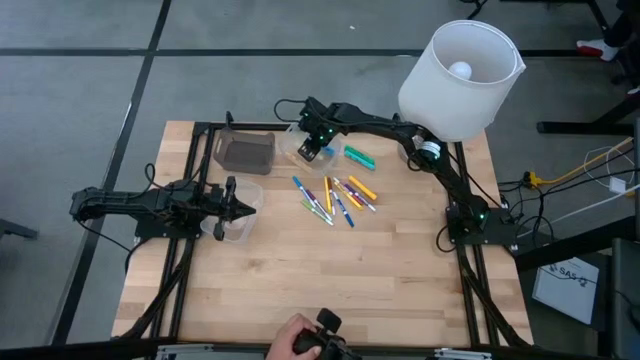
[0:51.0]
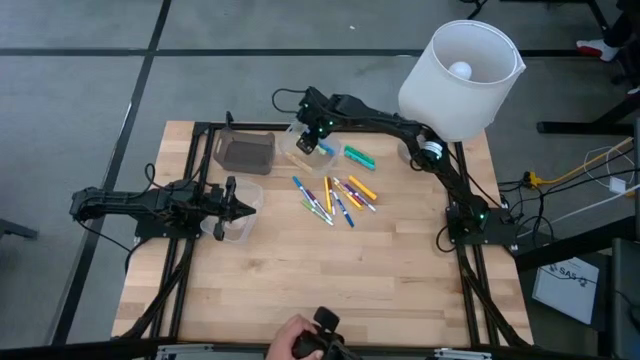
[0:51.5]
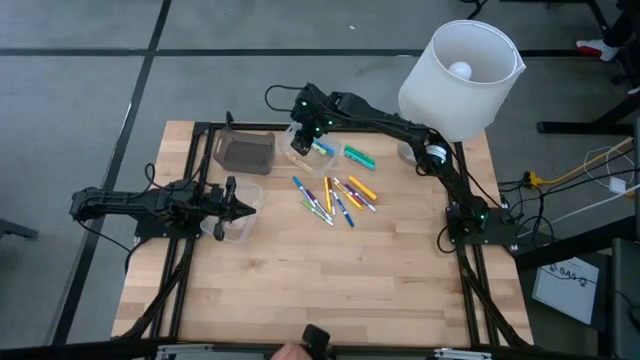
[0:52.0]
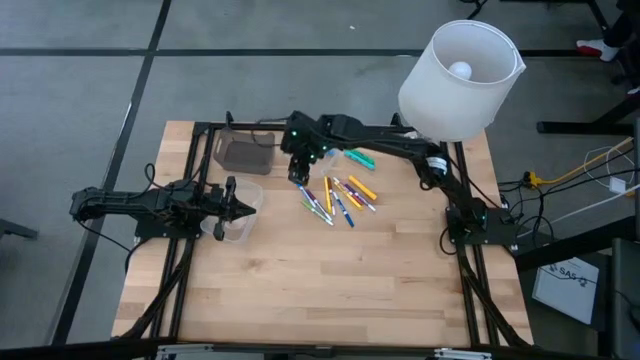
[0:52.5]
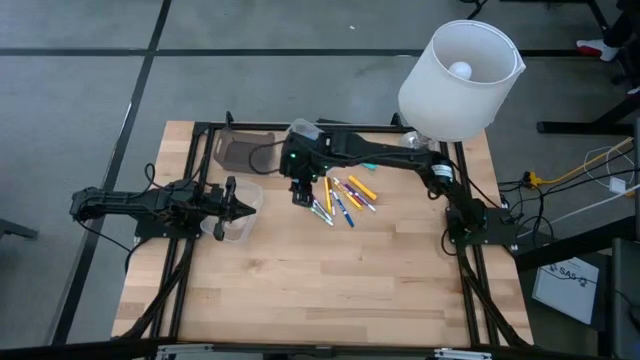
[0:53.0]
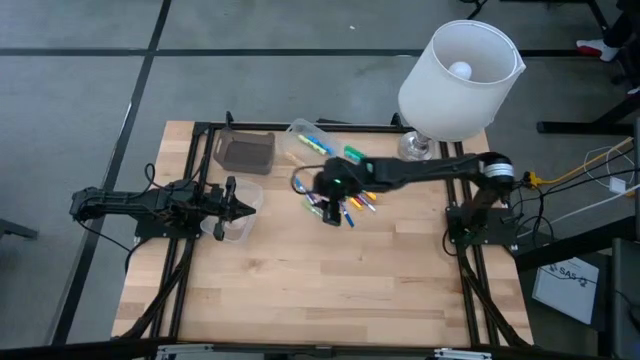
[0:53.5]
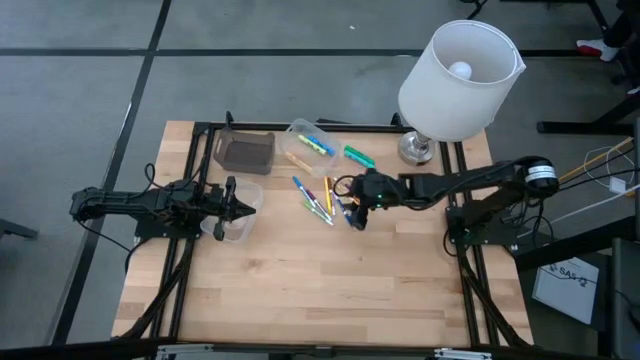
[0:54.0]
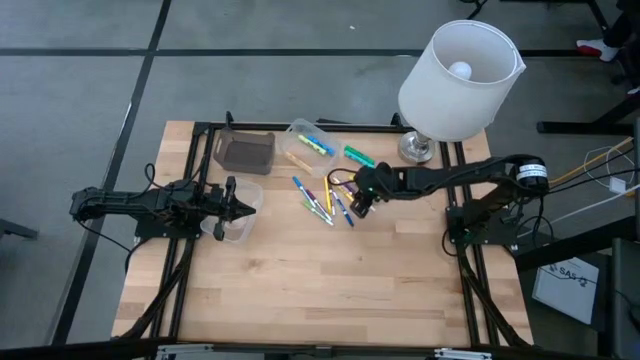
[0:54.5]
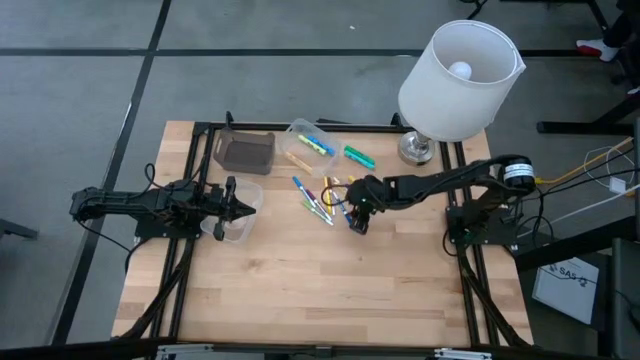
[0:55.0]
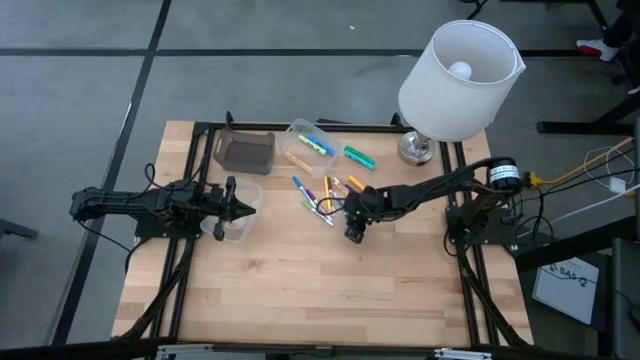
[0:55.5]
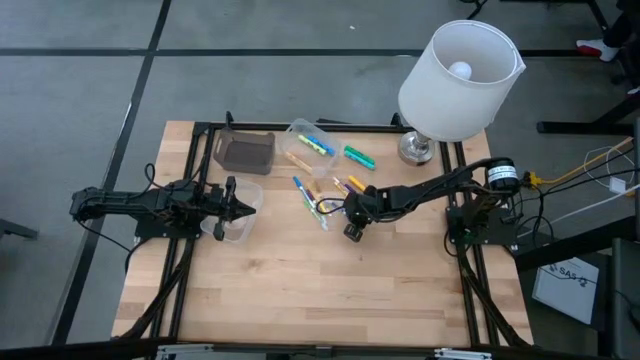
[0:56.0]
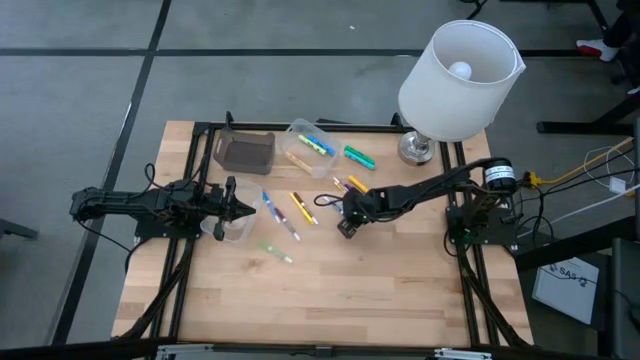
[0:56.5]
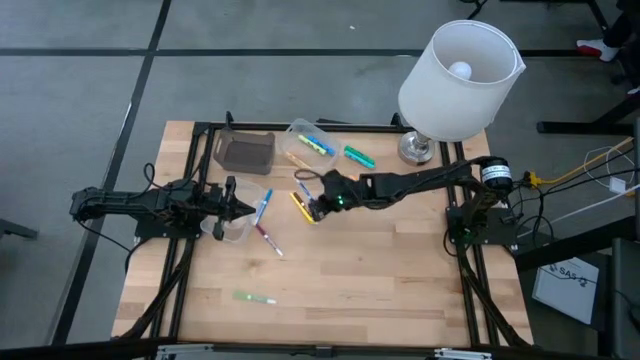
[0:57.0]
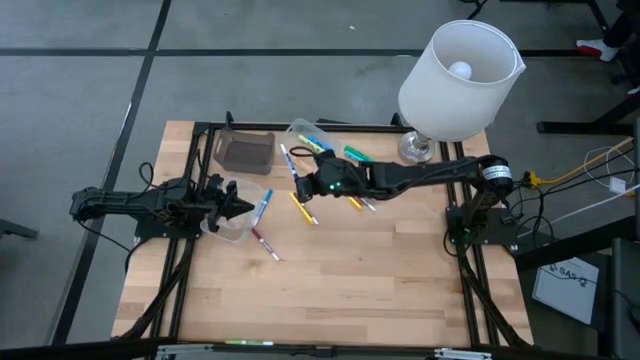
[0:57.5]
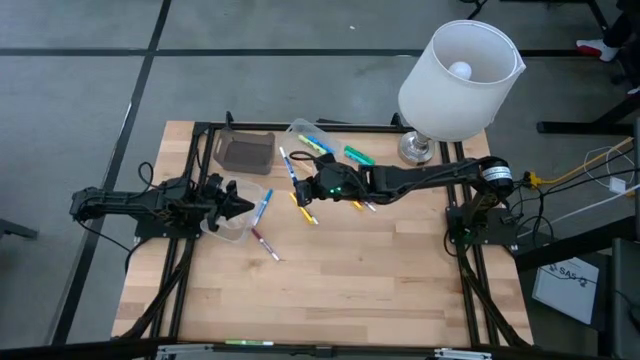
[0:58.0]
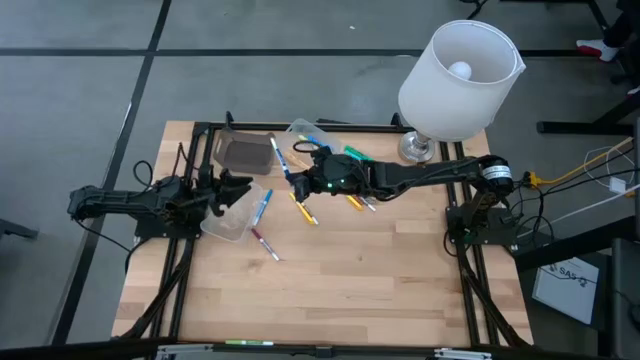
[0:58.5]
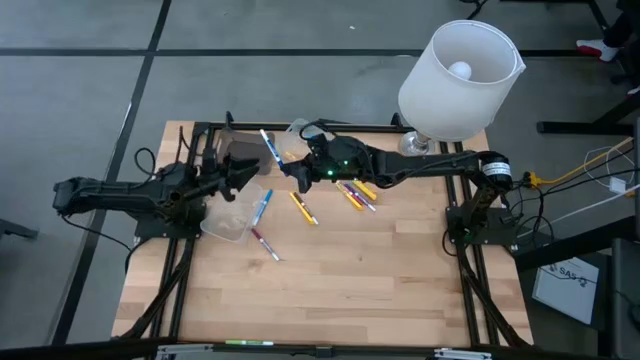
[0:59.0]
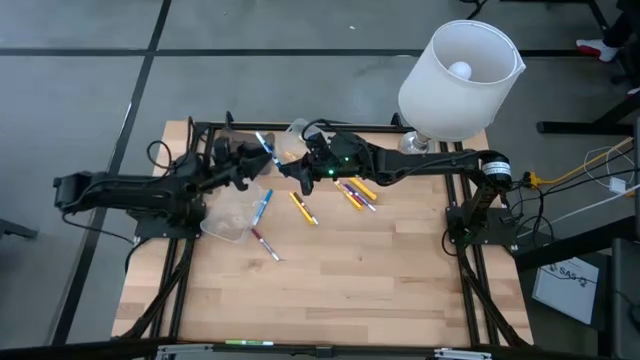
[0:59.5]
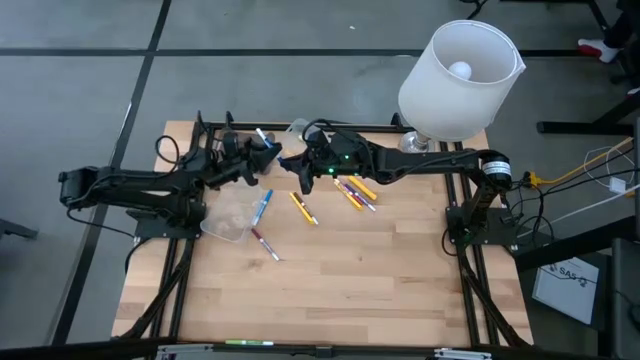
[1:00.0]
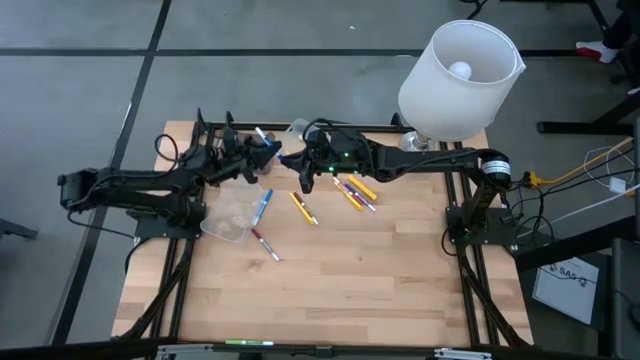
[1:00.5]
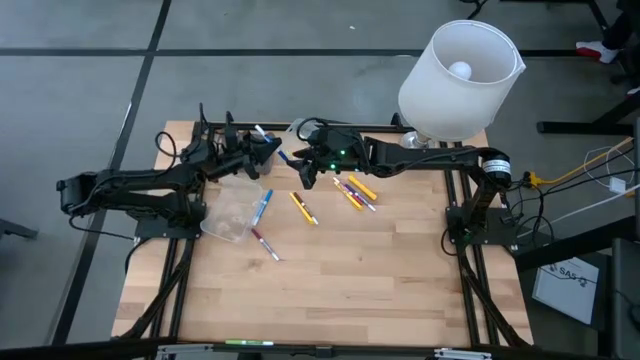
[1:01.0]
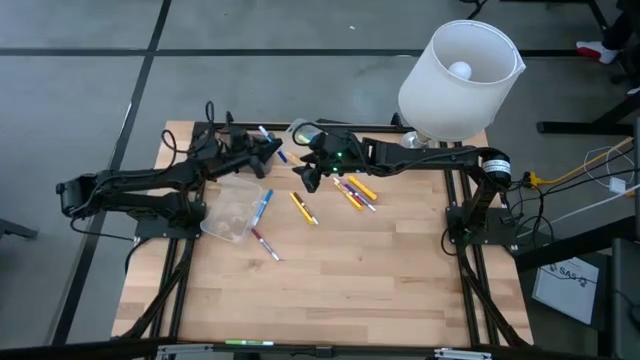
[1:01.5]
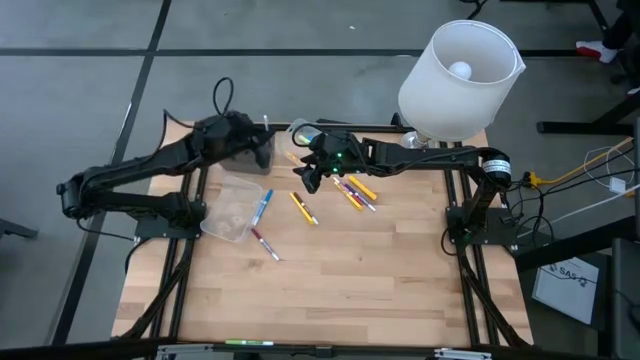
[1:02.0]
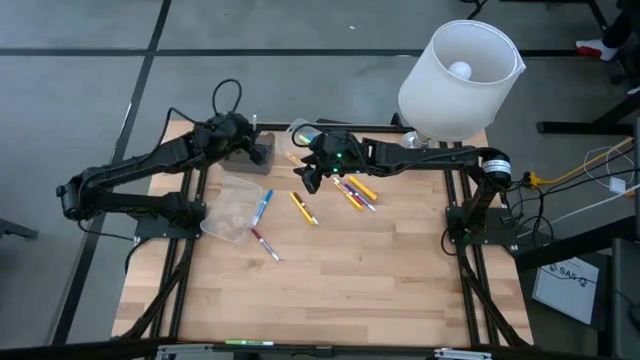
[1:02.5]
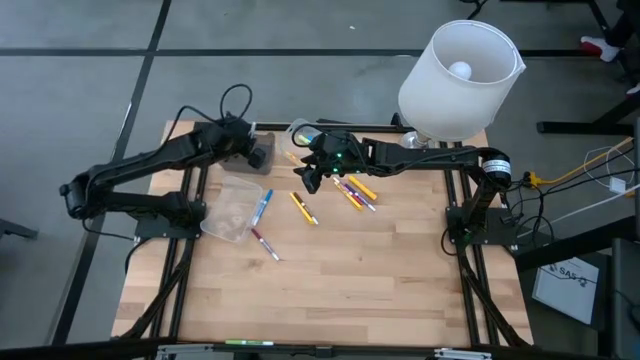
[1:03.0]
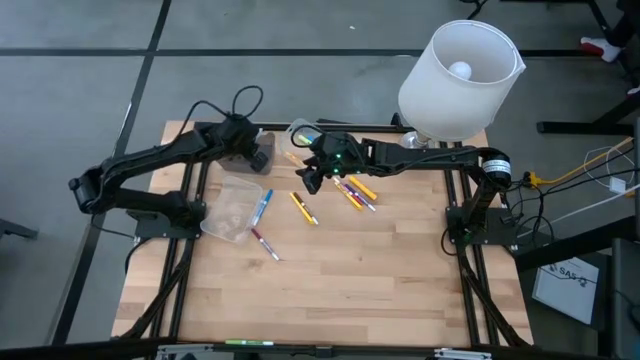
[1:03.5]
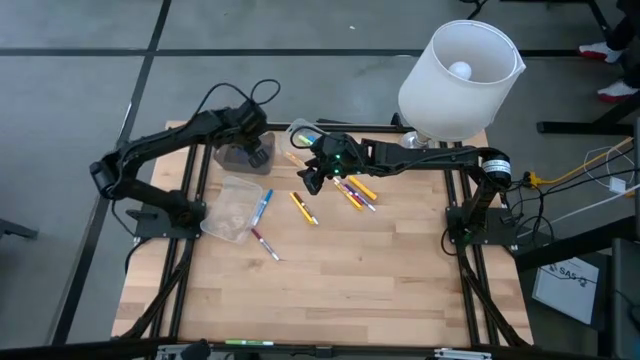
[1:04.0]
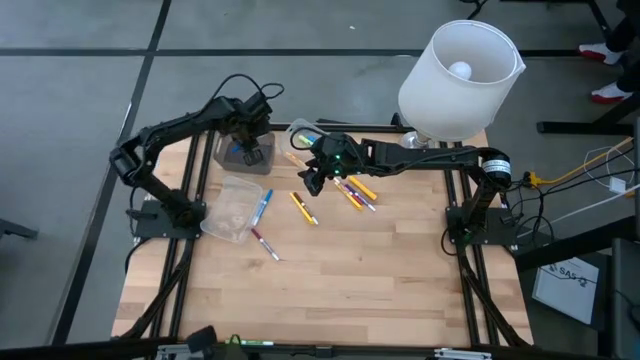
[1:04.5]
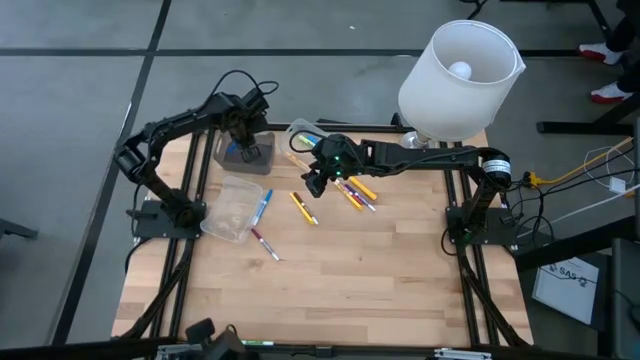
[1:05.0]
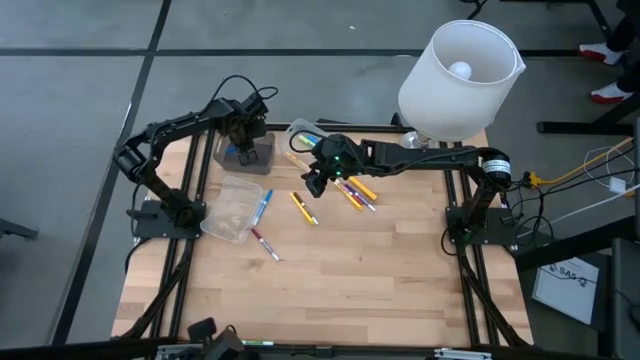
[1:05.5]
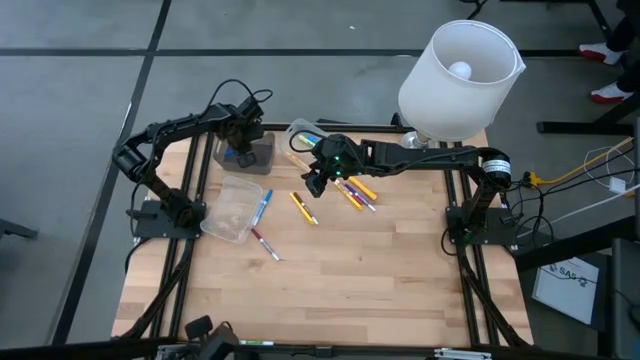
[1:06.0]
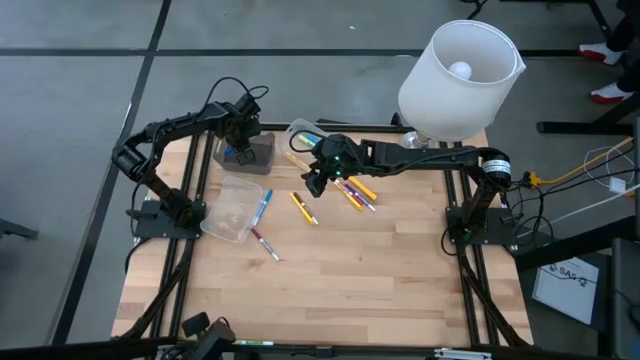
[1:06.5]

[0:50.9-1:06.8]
Task: Pick & Place Markers
Put the blue marker into the black bin

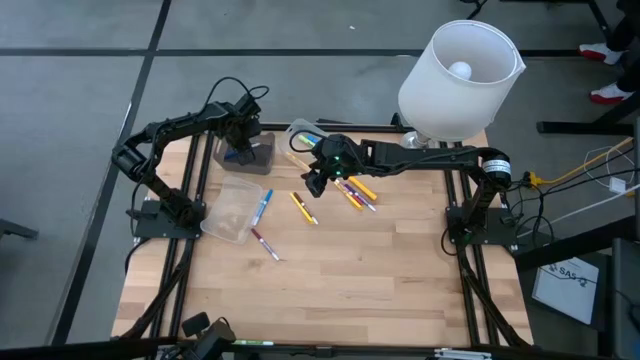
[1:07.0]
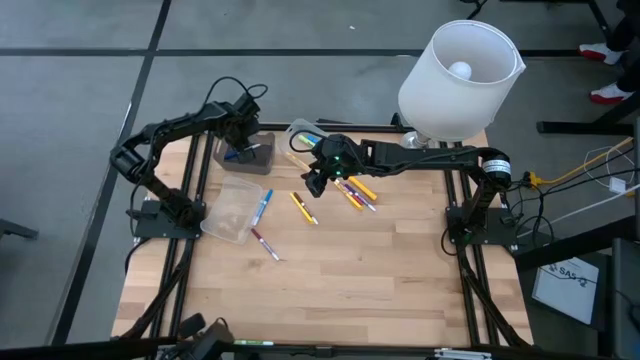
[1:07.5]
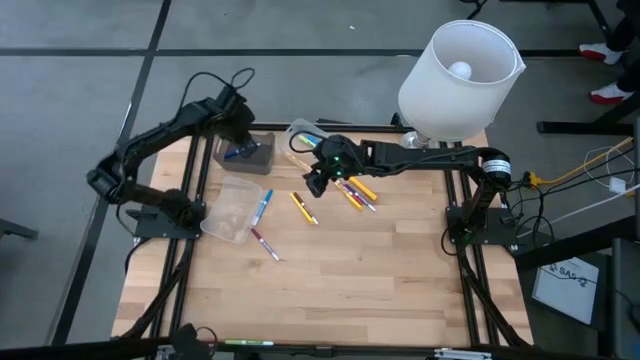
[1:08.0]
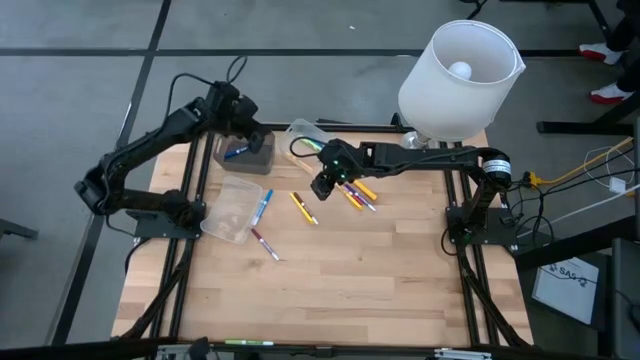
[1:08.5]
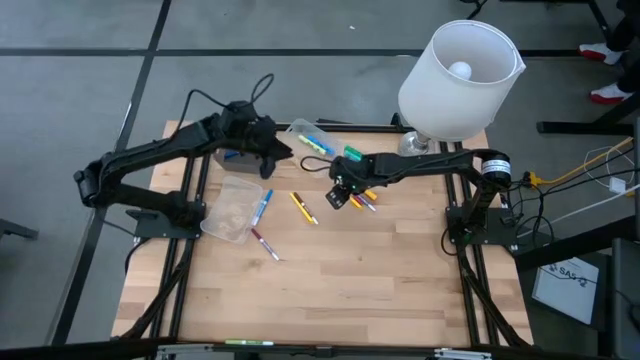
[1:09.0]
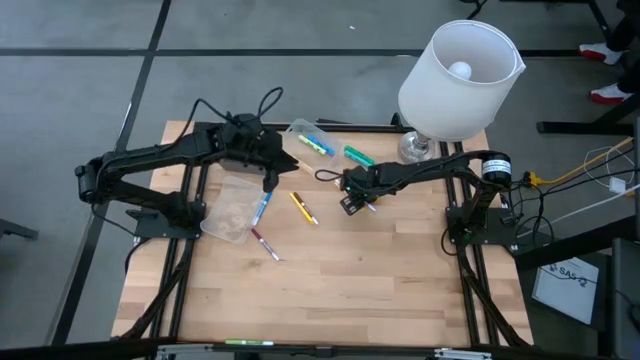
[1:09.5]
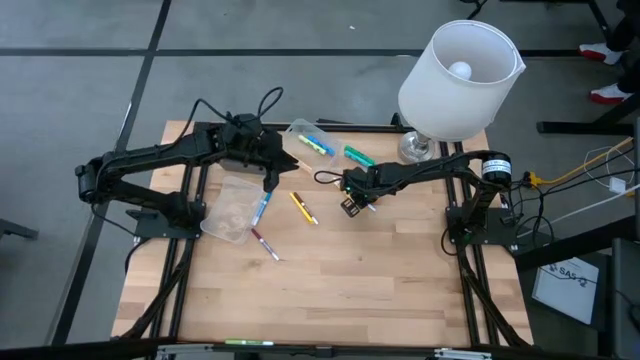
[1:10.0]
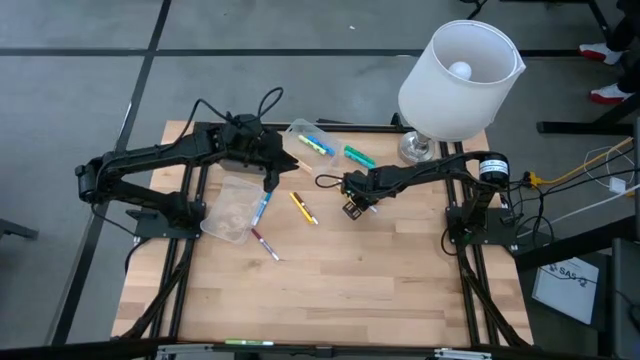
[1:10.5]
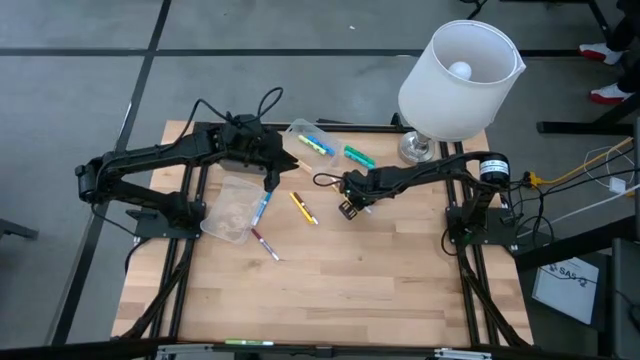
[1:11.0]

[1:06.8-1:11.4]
Put the violet marker into the black bin
